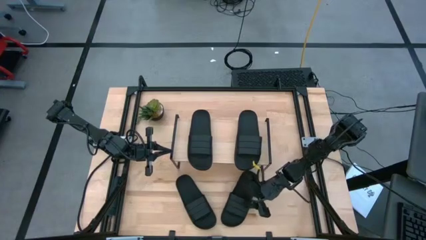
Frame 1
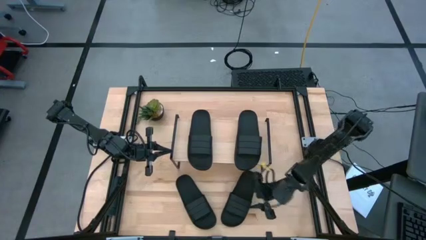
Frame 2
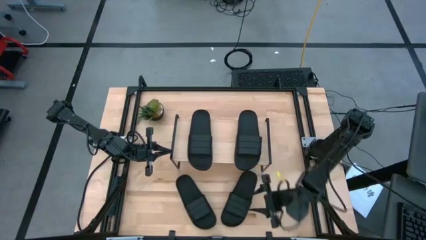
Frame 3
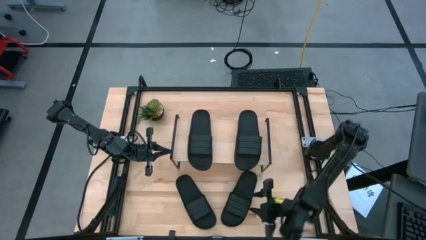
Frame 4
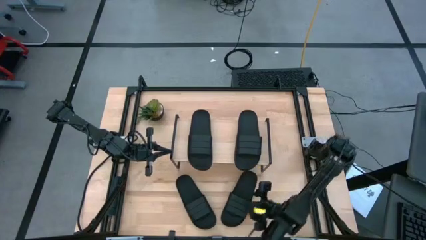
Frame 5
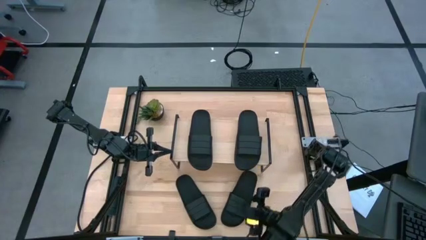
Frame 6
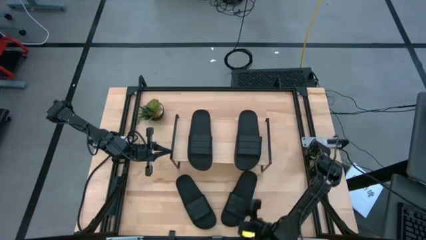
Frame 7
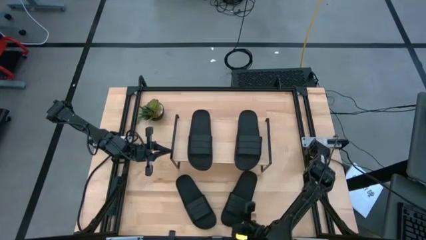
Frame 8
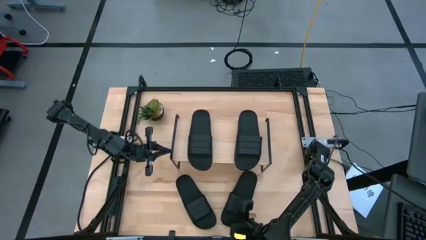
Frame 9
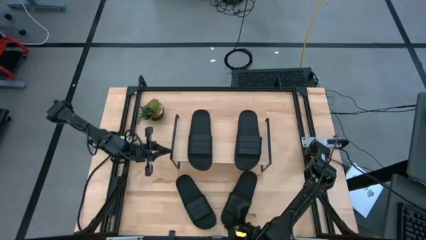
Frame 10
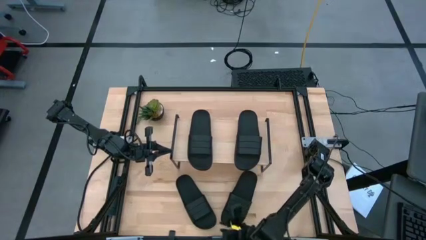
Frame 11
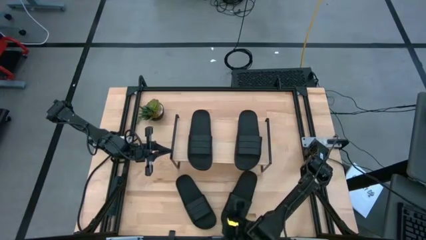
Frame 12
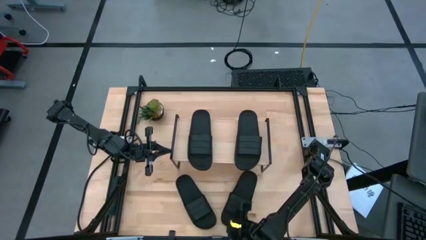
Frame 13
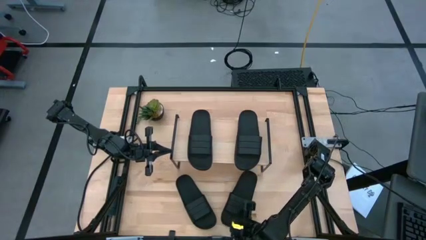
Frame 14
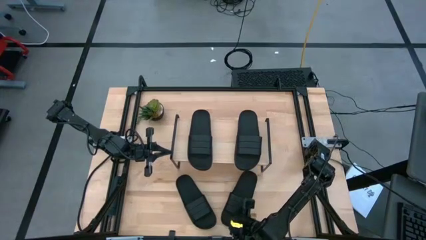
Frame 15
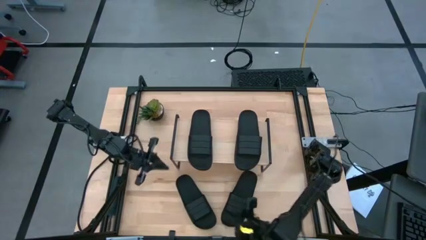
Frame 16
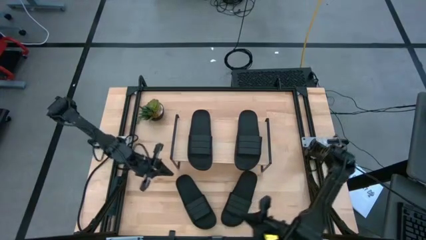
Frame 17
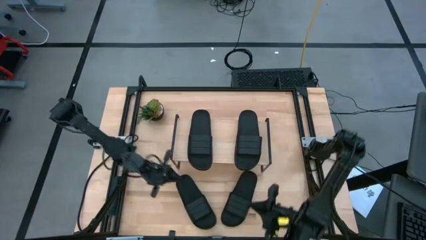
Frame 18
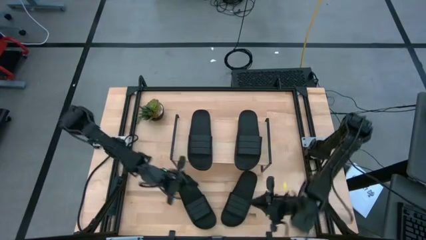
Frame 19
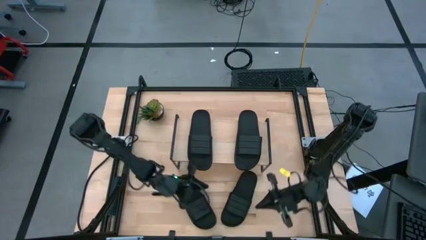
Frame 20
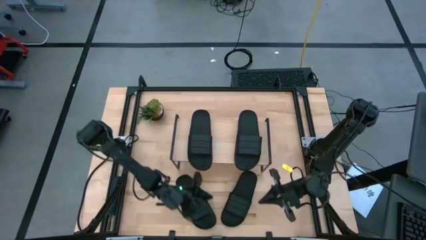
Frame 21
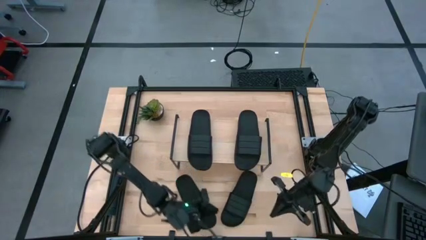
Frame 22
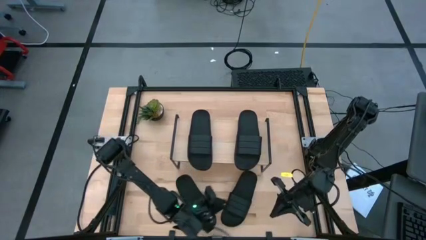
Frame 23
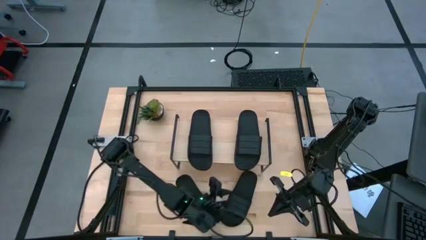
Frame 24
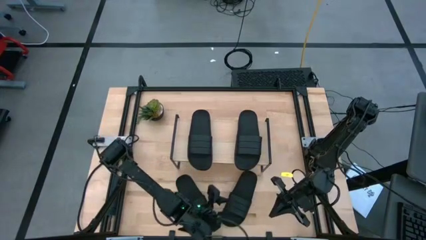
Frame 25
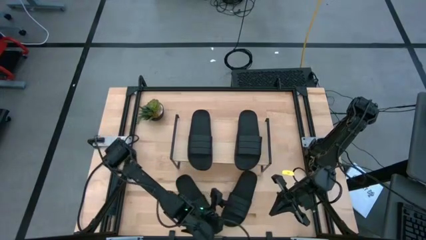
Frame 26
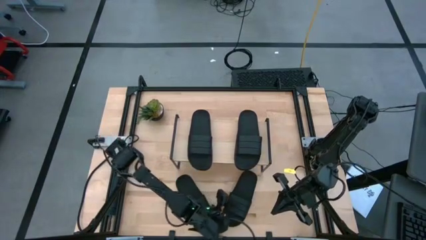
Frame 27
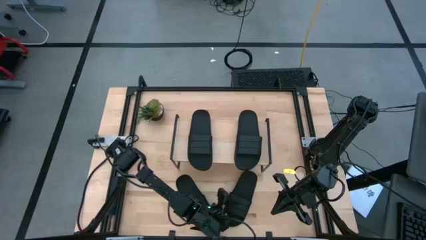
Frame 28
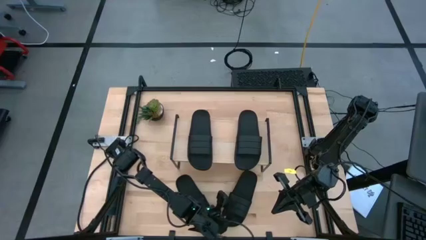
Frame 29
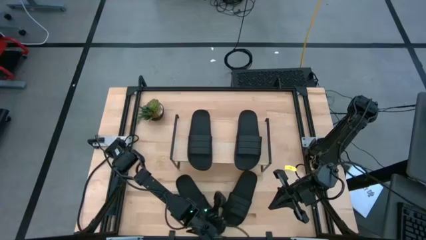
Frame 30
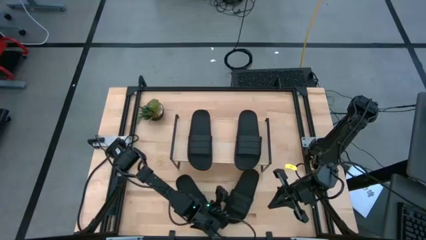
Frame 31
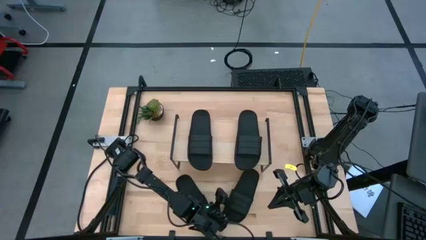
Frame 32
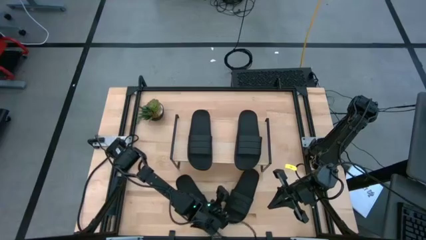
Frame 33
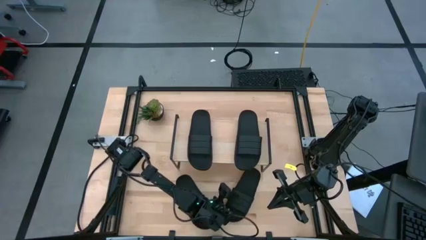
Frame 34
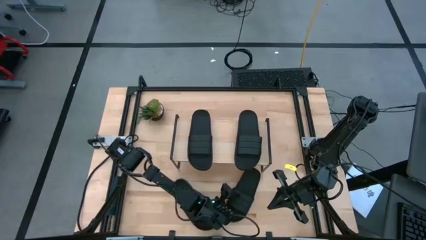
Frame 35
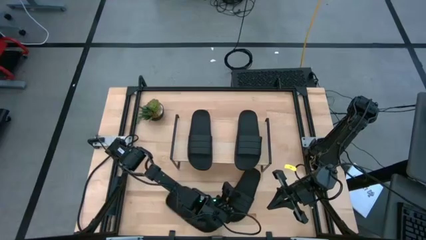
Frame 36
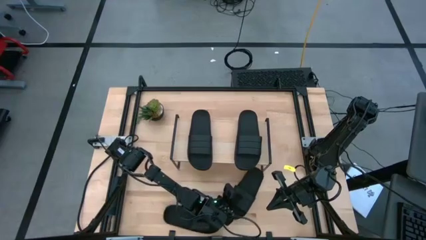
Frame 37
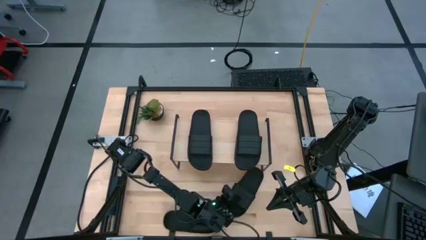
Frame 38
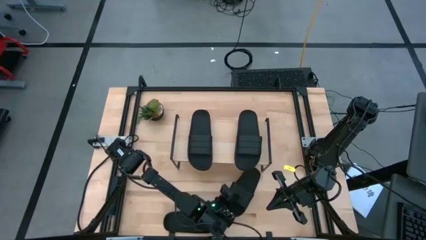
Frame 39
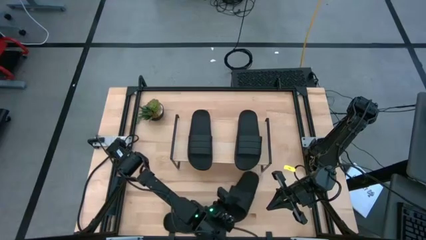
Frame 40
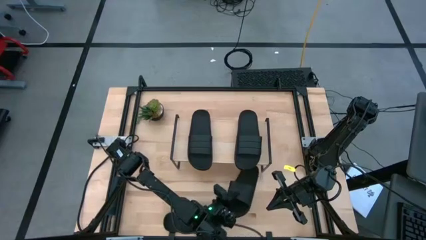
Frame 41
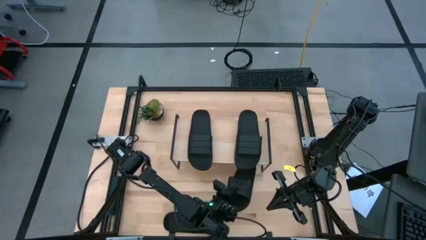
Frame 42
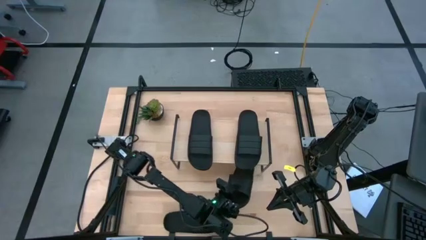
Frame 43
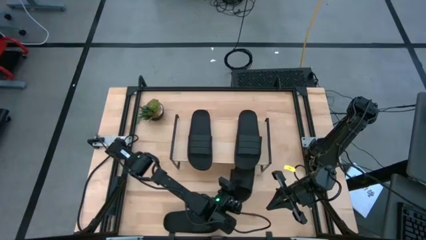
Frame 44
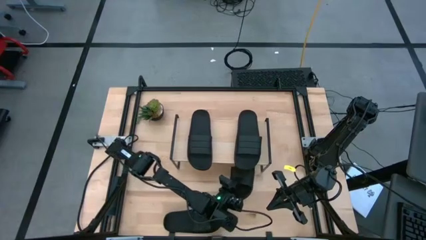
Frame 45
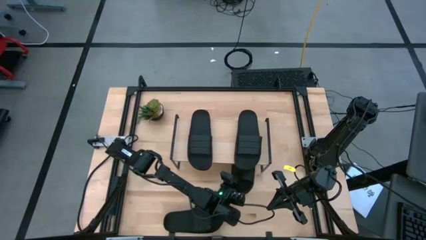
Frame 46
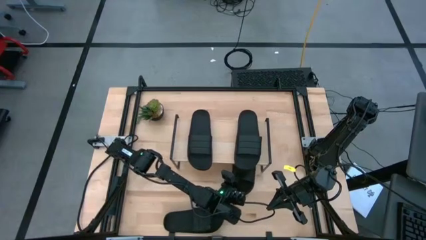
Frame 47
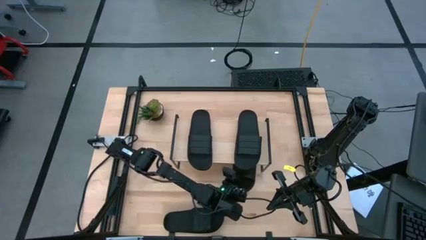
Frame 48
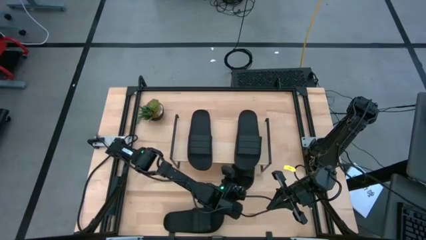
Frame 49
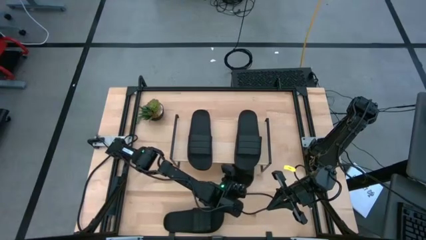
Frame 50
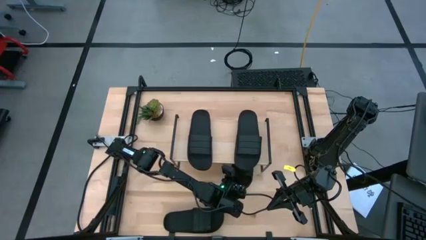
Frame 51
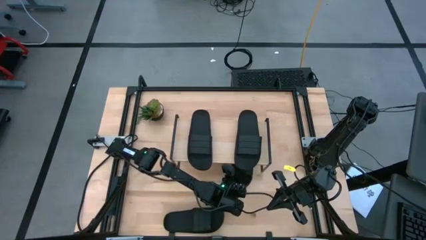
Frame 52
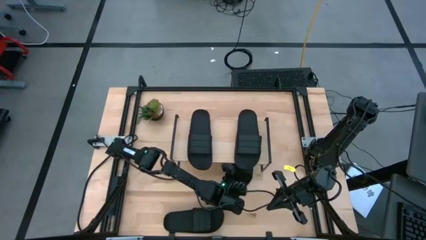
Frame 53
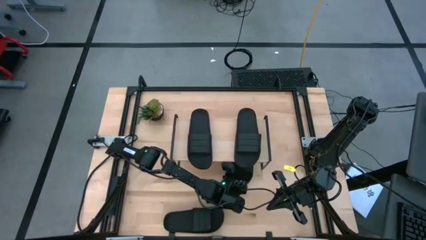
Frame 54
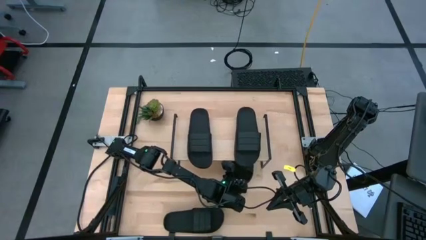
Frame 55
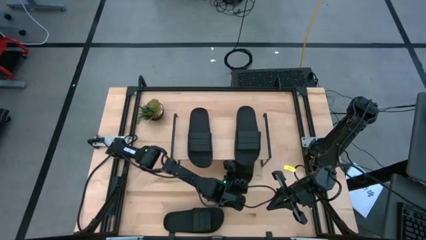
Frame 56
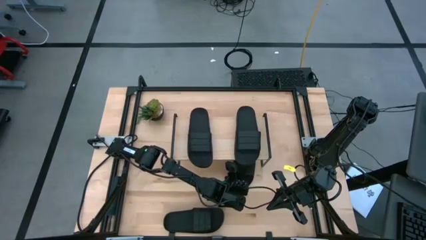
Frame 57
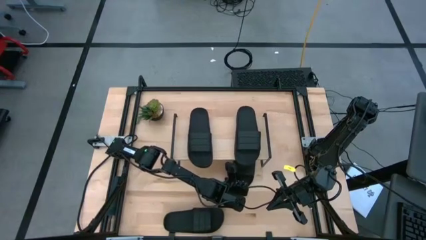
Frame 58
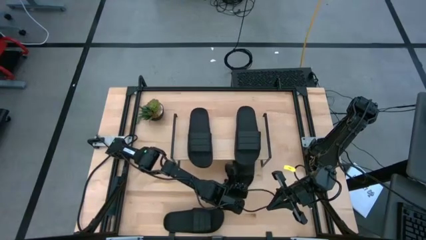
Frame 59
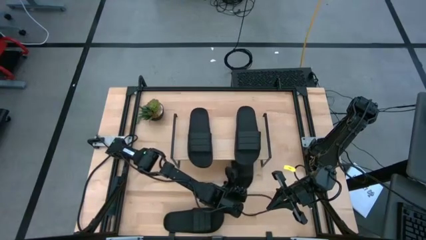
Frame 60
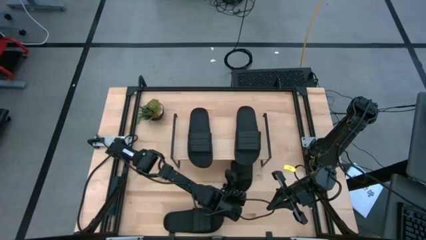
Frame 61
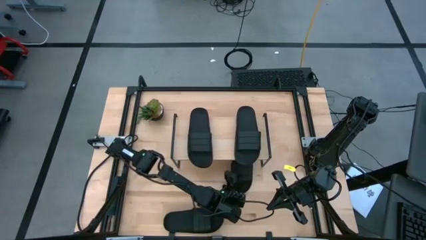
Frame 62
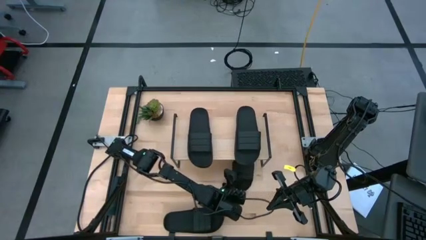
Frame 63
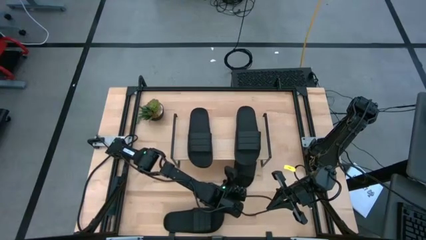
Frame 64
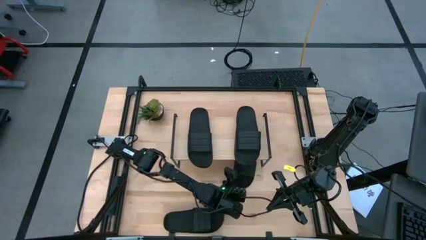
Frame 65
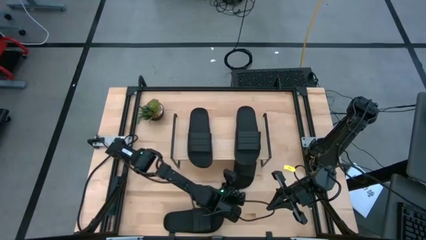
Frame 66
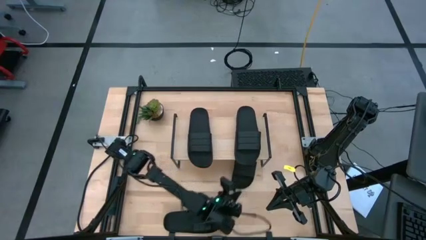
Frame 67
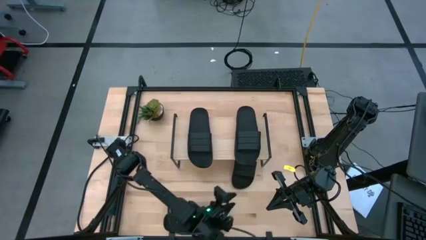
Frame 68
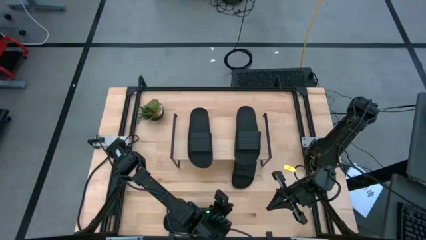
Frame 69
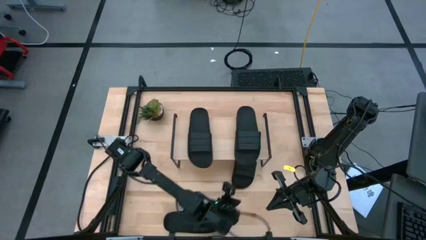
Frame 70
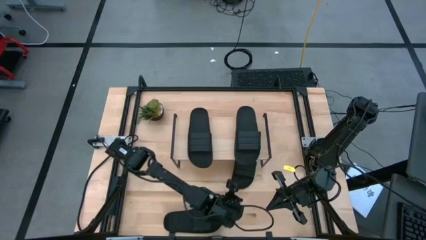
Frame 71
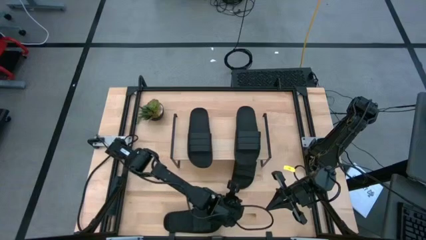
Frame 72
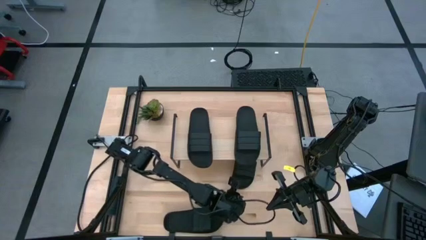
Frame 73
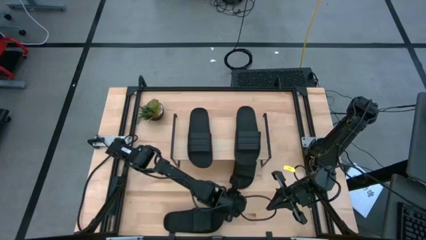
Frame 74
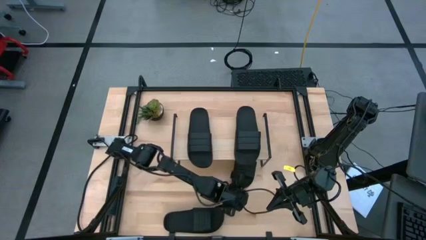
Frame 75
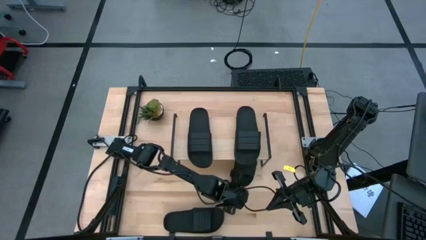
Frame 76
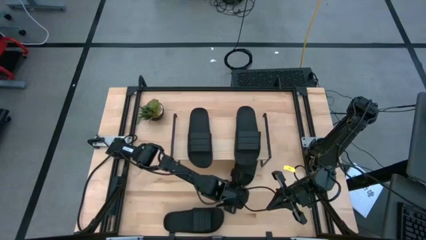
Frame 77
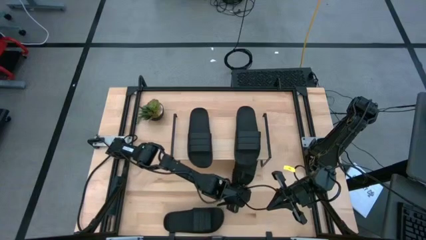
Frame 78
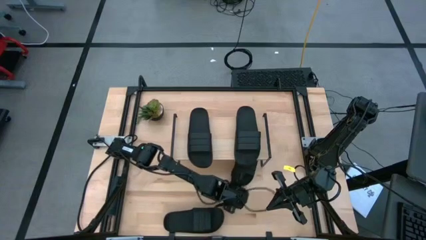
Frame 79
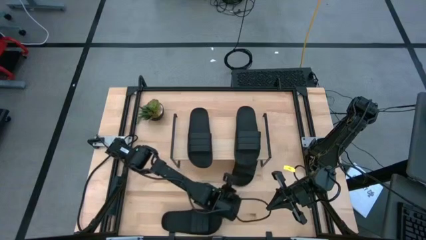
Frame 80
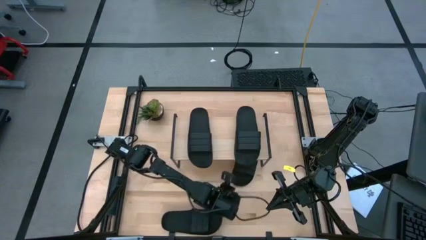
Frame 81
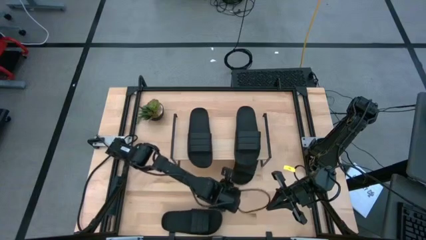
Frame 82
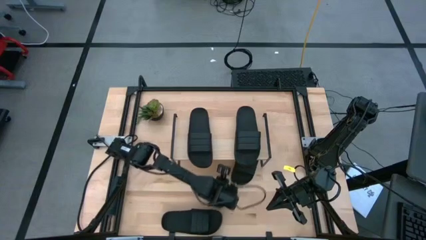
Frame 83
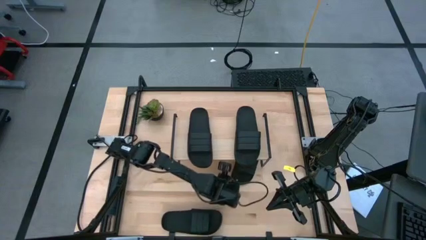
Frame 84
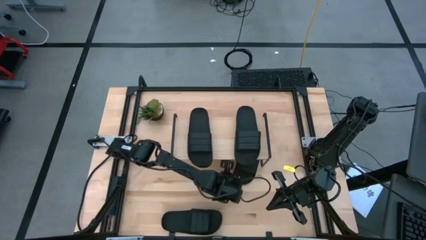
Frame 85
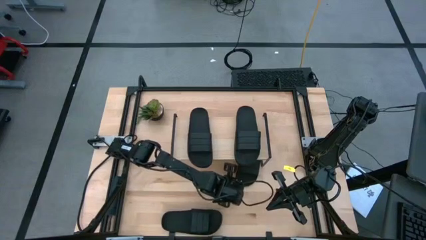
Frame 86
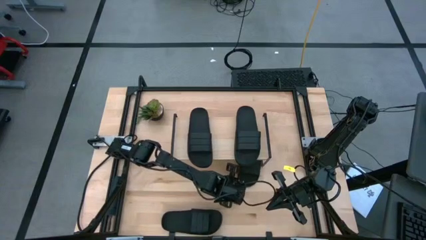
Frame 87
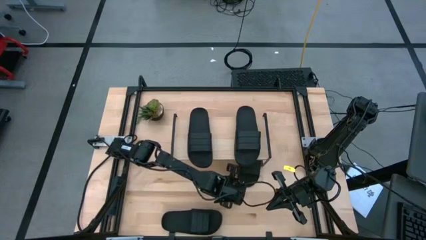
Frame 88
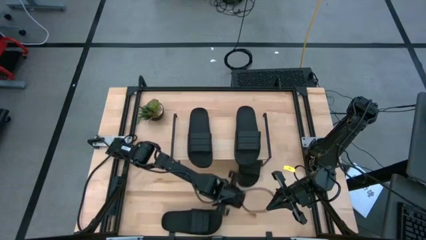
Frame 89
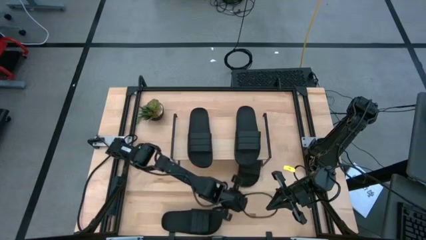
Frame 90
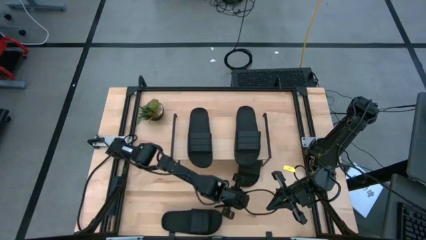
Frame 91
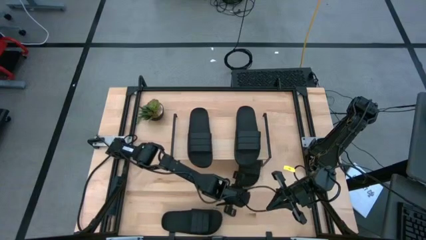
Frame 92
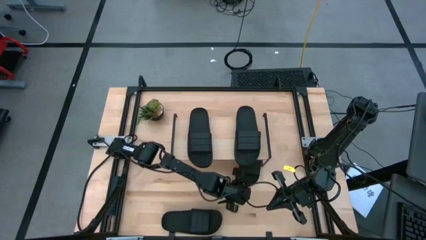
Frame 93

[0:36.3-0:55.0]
Task: Pick and place slides into the shelf
Put the black slide under the shelf
